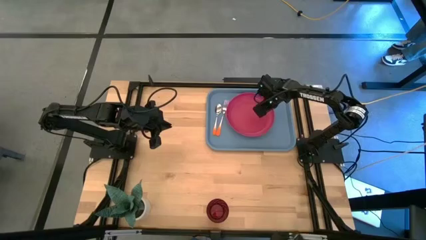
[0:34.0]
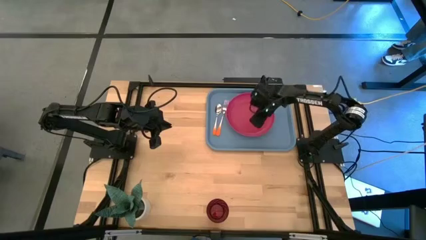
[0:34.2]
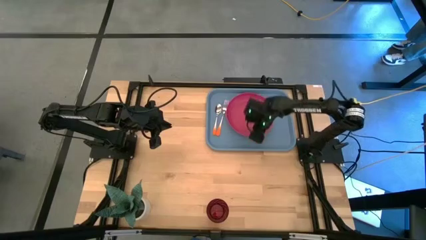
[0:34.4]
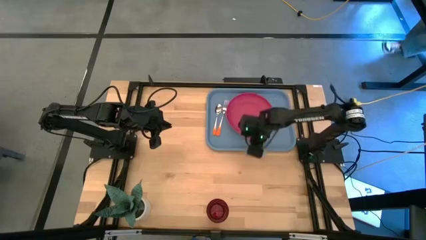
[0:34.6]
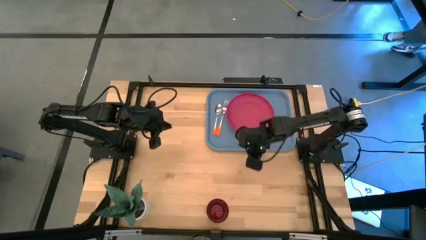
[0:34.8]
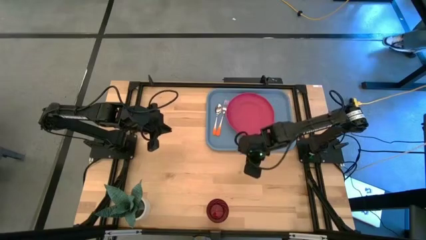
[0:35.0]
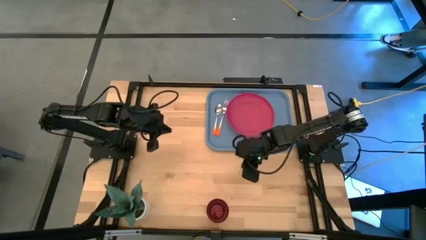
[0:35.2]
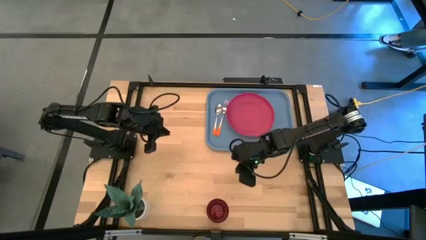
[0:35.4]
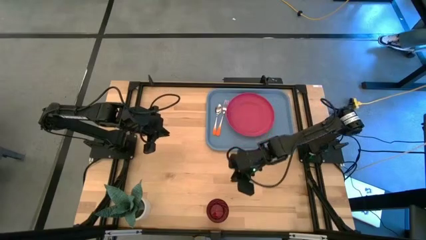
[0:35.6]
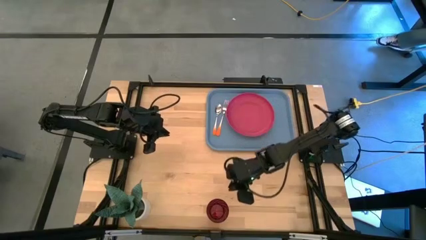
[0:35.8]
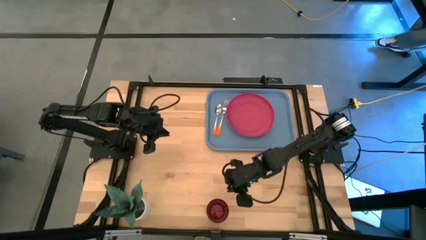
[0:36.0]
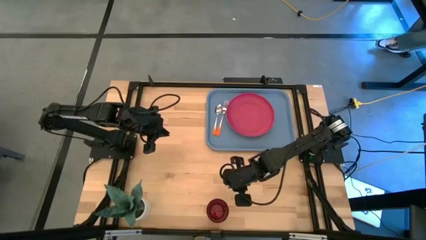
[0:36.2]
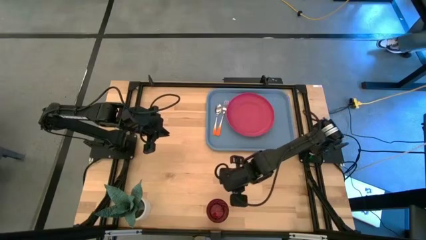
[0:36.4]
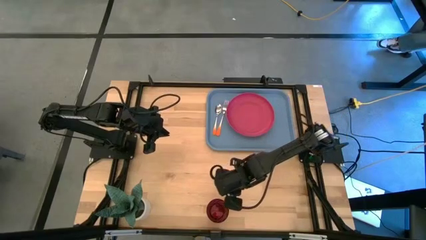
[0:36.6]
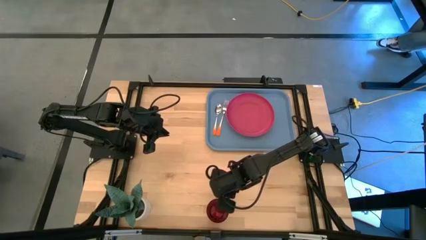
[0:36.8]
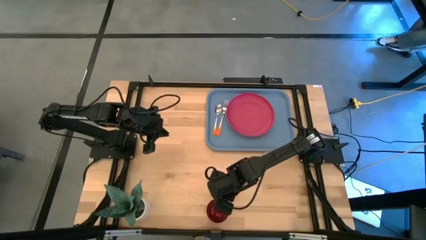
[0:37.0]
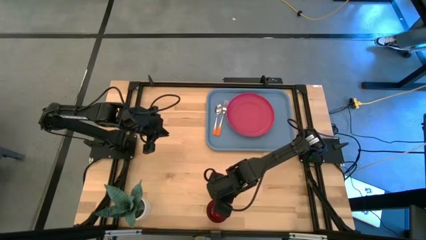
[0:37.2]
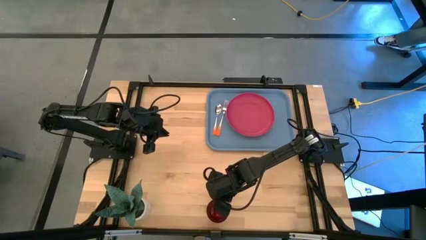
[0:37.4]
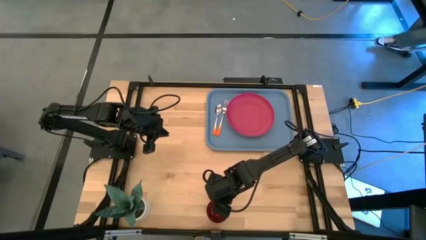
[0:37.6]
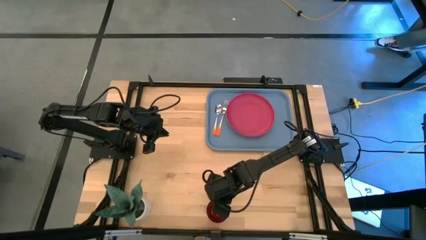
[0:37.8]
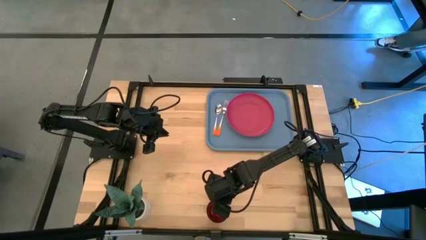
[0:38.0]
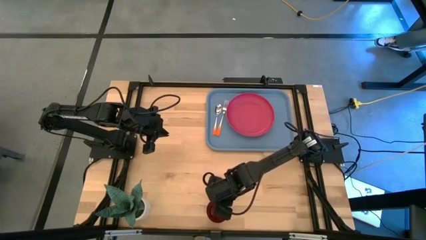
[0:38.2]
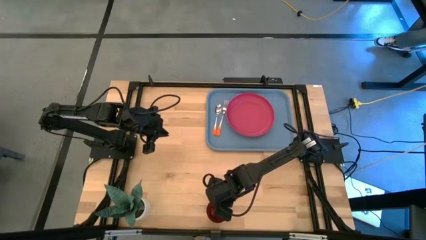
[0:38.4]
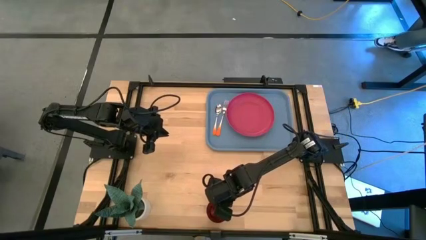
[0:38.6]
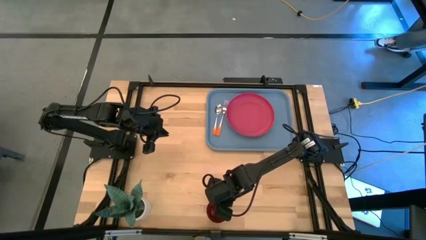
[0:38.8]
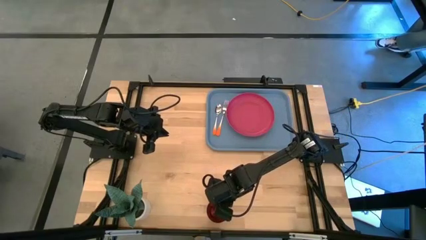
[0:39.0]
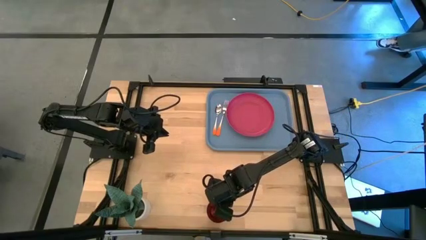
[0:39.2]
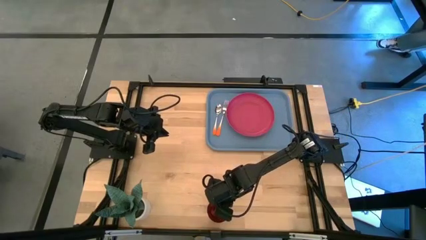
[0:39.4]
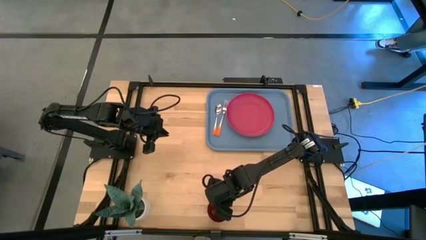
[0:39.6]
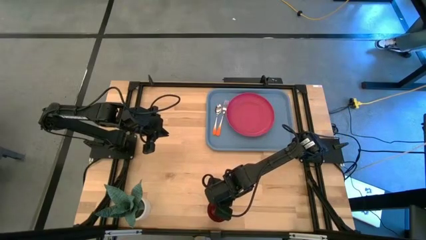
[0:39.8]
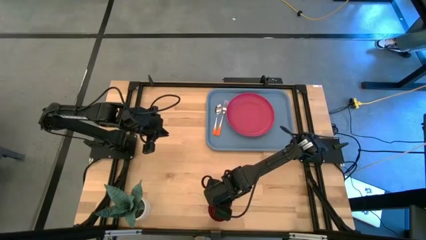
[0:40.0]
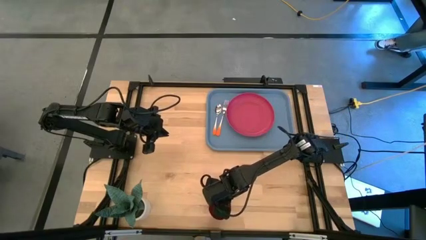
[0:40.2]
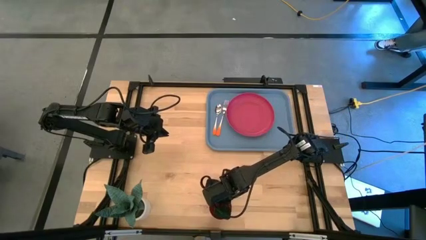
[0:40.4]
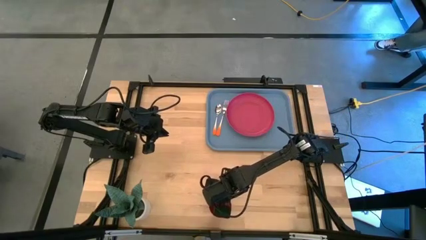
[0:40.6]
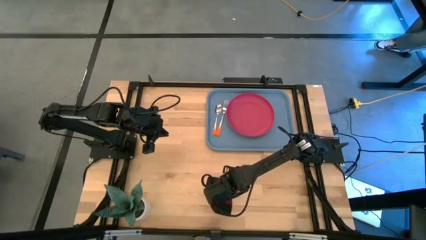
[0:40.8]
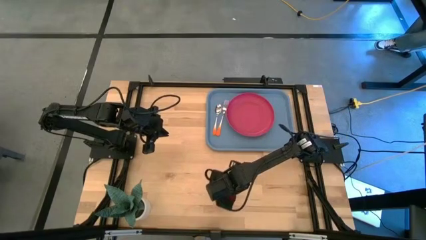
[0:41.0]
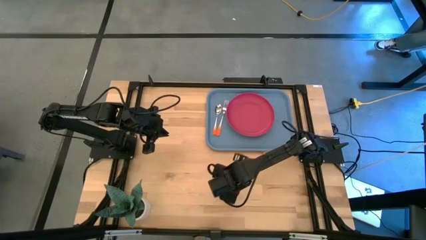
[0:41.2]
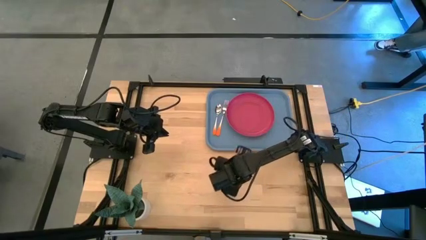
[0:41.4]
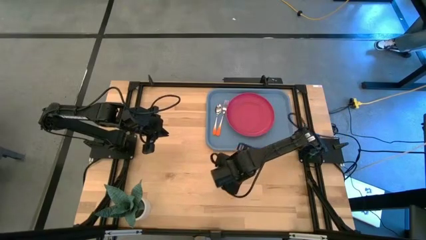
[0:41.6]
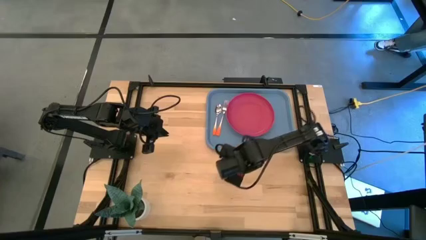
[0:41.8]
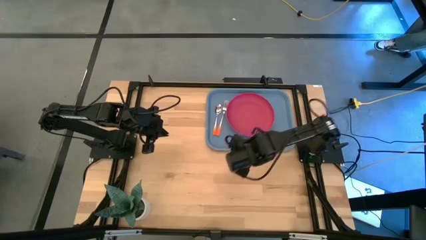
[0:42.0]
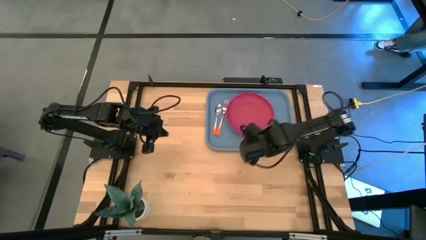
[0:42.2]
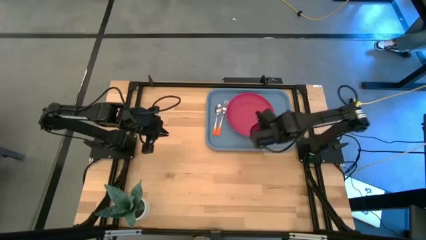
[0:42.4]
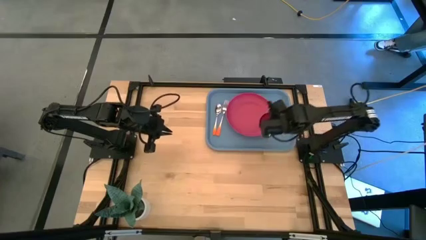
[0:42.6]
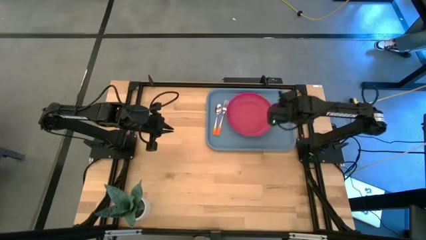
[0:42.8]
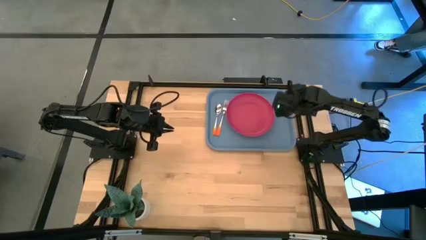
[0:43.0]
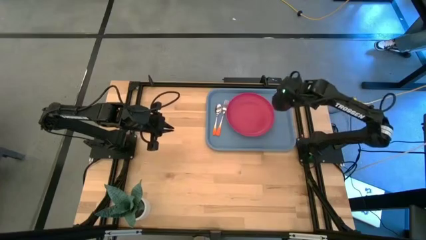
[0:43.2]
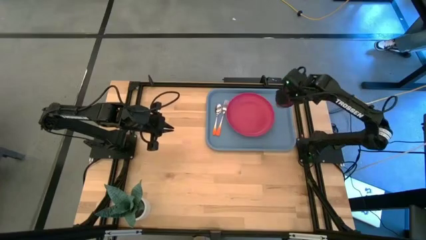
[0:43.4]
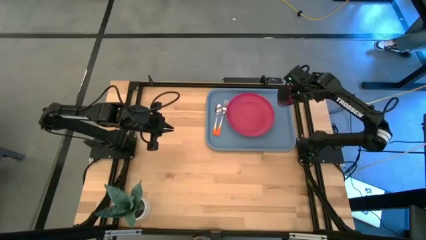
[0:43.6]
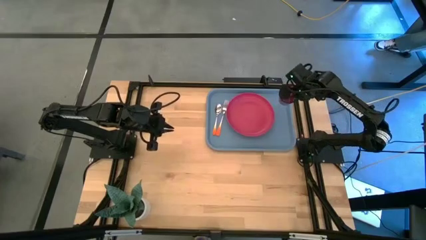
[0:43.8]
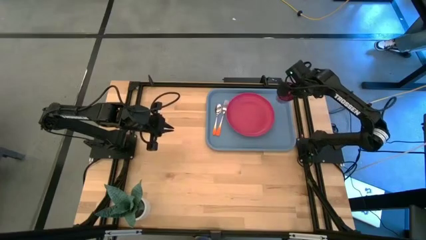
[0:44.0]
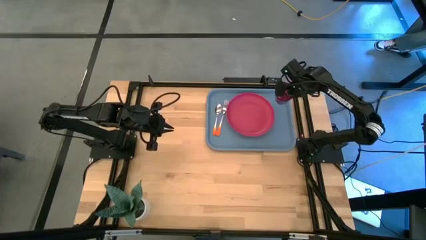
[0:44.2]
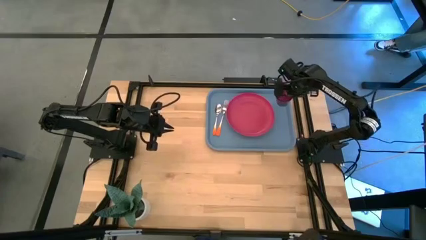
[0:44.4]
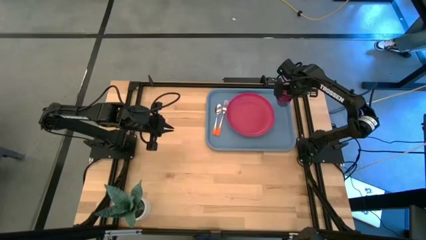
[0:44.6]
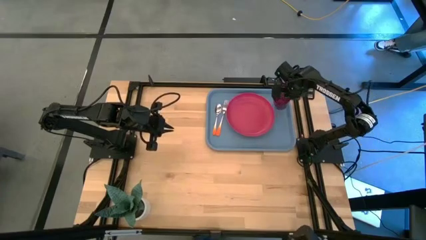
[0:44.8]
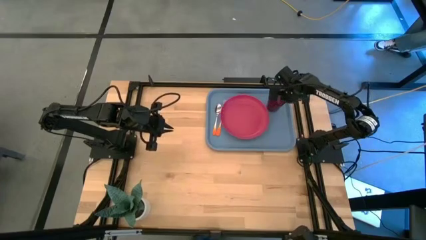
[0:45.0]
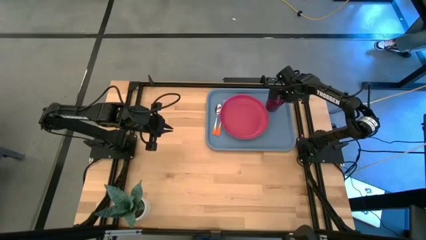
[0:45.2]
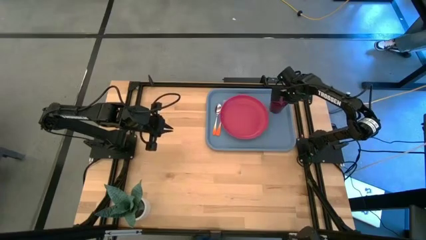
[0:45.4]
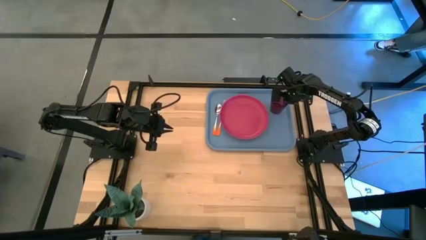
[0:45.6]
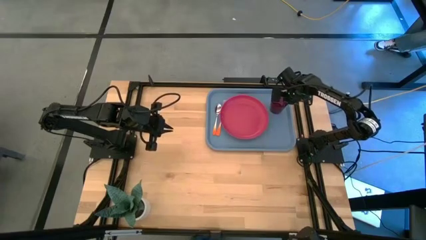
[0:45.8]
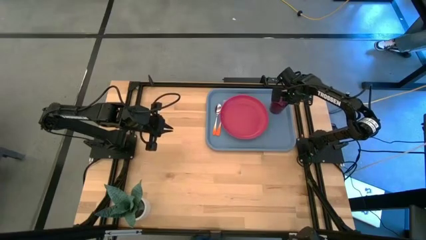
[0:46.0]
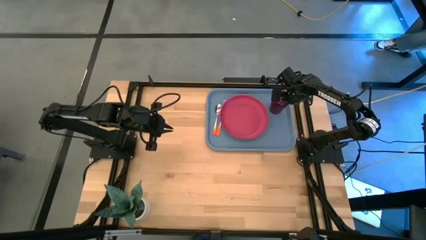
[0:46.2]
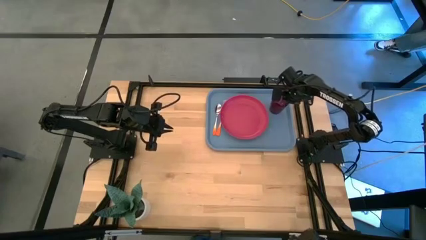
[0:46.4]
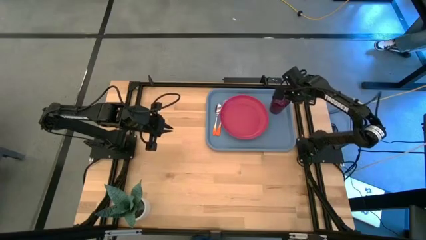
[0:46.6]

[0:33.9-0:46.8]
Task: Pick and place plate/cup/fork/spoon on tray
Put the red cup on the blue tray

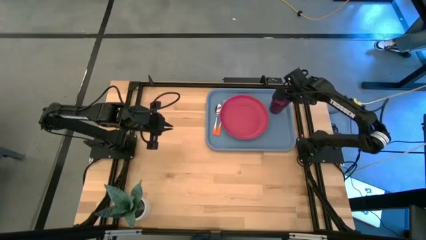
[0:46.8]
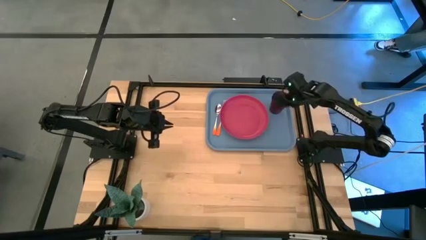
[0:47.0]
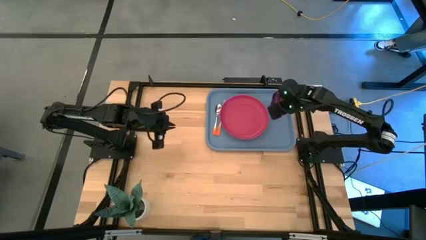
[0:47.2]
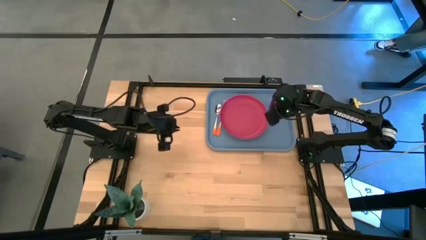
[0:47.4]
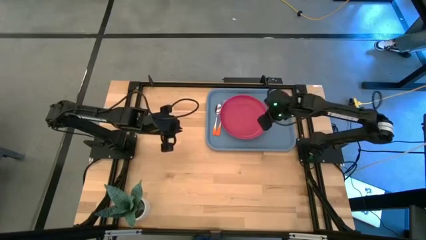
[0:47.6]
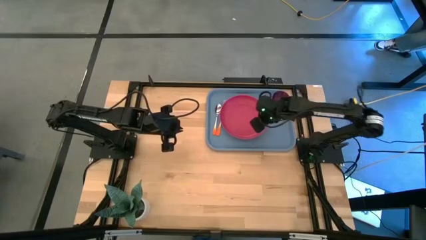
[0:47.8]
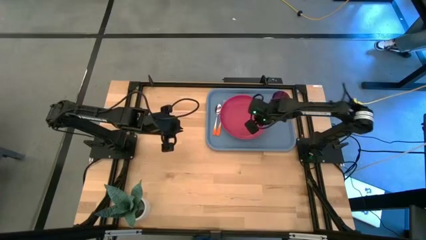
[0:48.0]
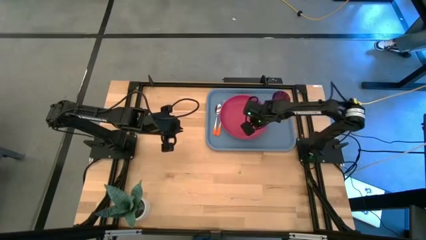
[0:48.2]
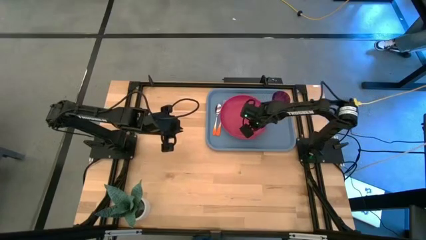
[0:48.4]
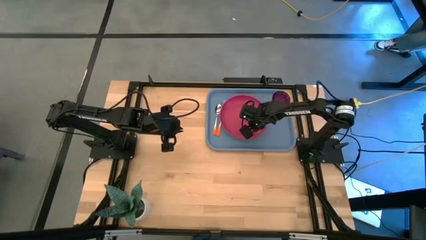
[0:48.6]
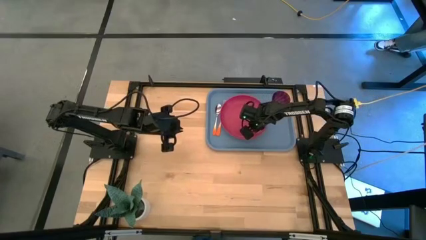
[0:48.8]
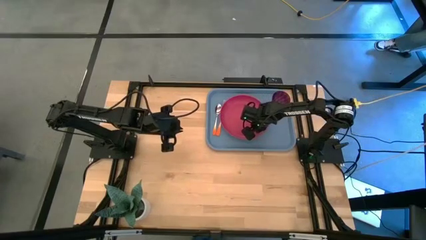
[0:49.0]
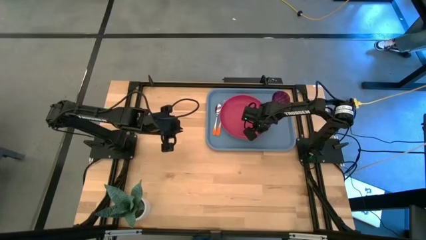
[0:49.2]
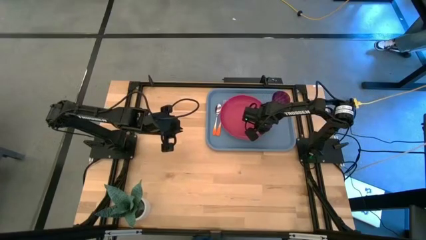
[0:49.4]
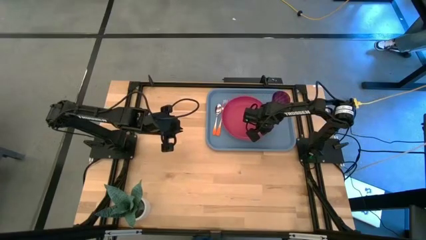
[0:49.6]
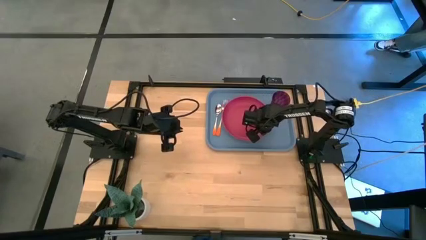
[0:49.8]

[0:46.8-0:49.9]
Adjust the red plate

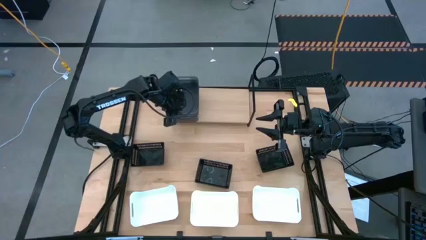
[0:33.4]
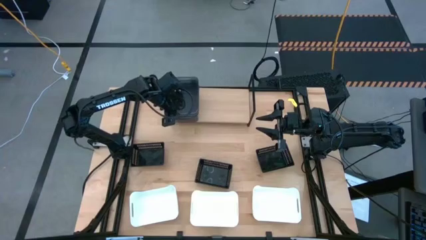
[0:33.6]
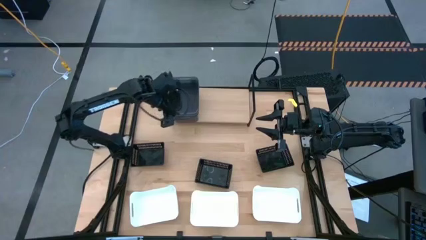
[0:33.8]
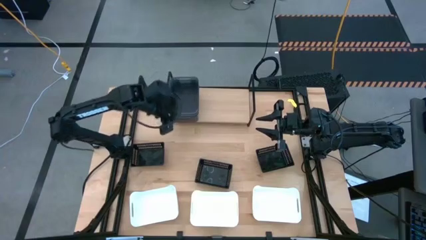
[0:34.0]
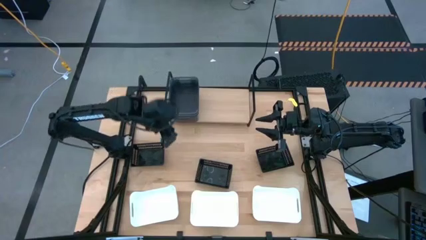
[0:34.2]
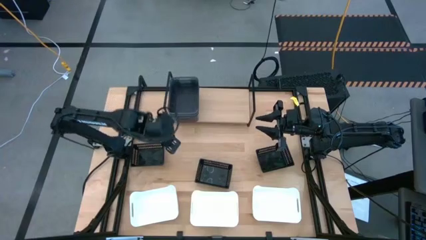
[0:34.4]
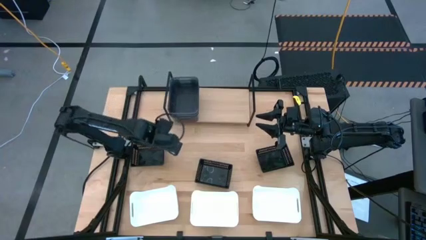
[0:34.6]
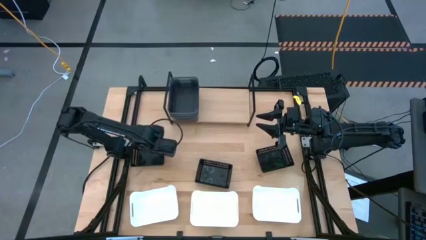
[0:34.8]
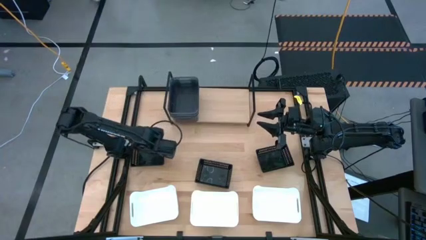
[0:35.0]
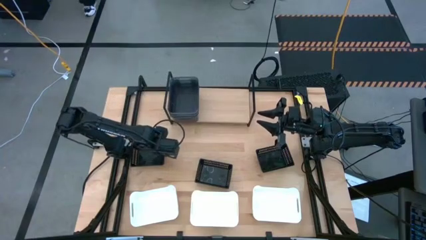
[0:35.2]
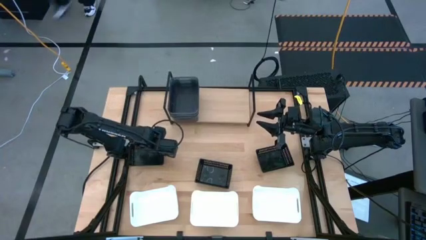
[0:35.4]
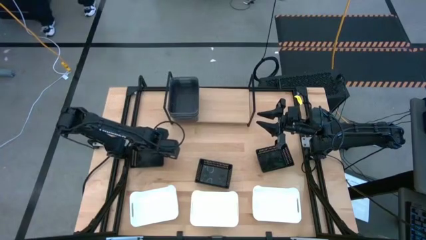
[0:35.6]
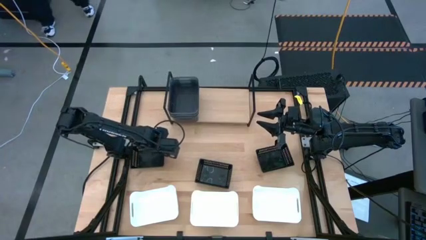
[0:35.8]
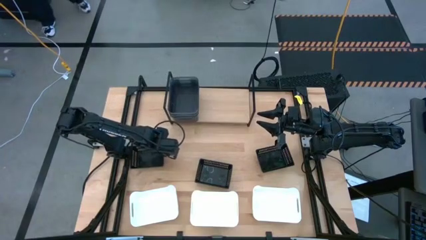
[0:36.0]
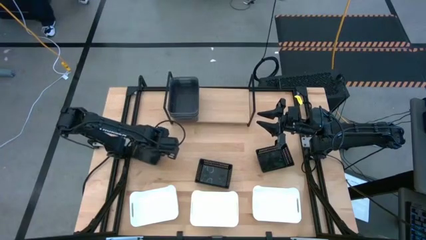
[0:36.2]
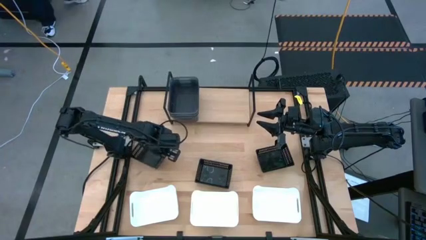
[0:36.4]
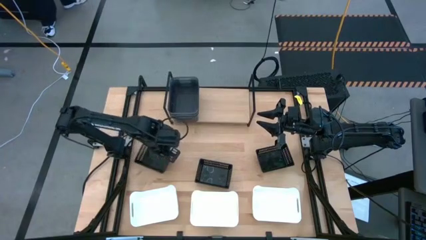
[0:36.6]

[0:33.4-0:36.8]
Task: Stack baskets on shelf by color
Put the top left black bin on the shelf
